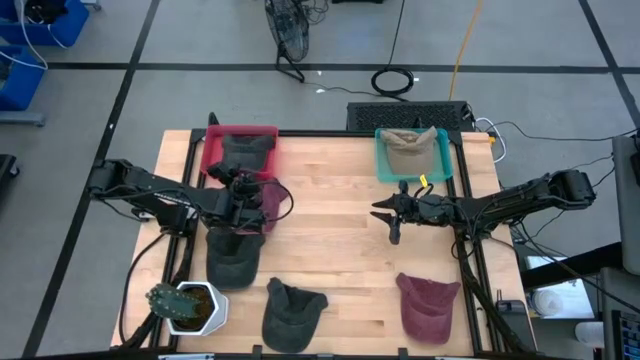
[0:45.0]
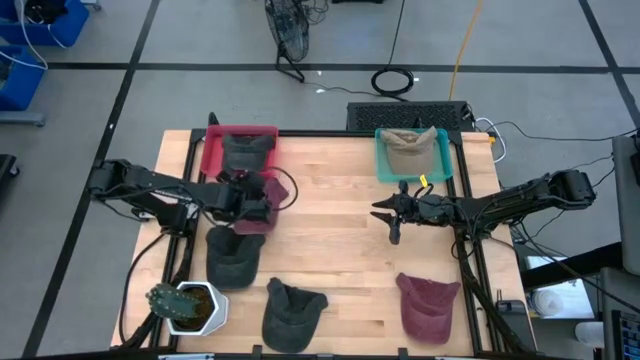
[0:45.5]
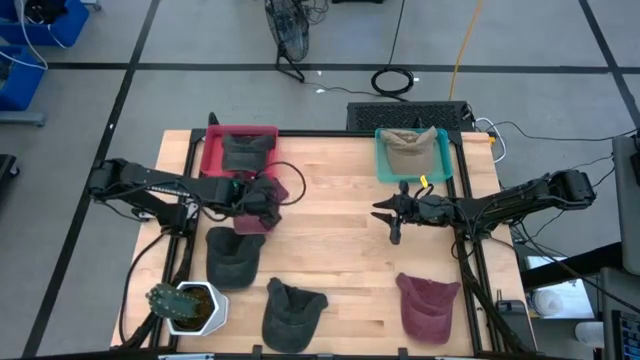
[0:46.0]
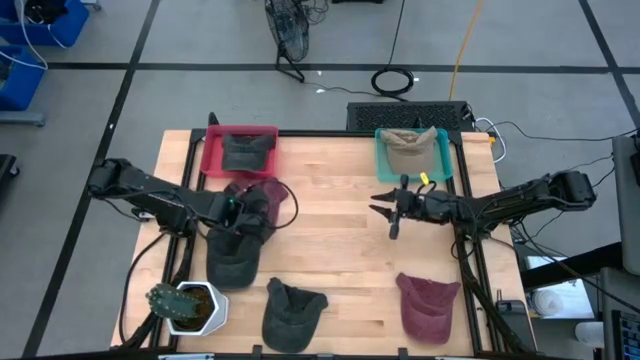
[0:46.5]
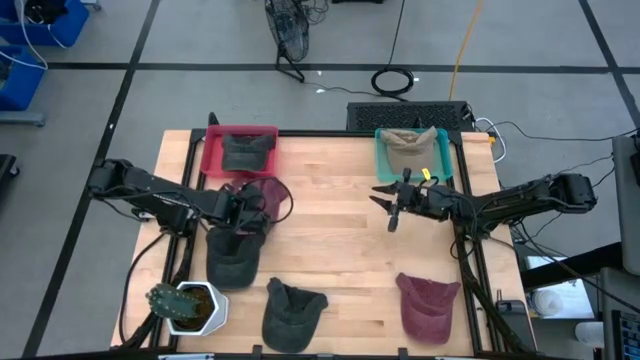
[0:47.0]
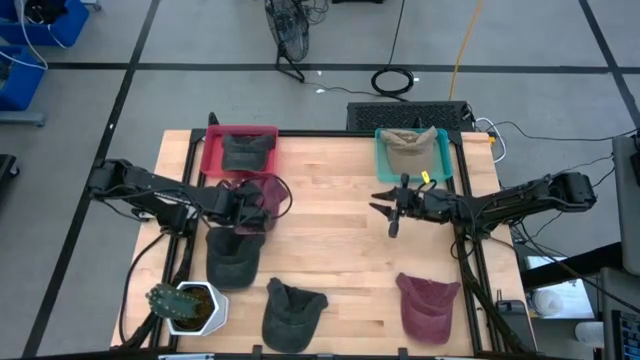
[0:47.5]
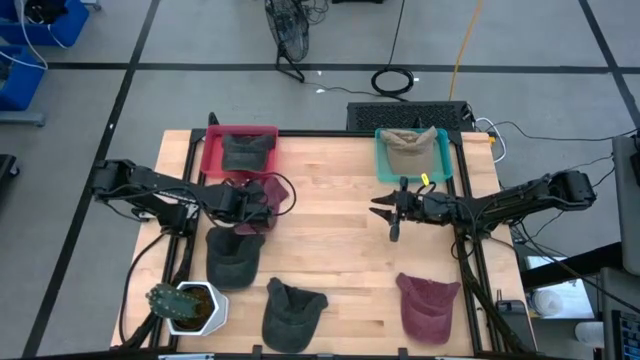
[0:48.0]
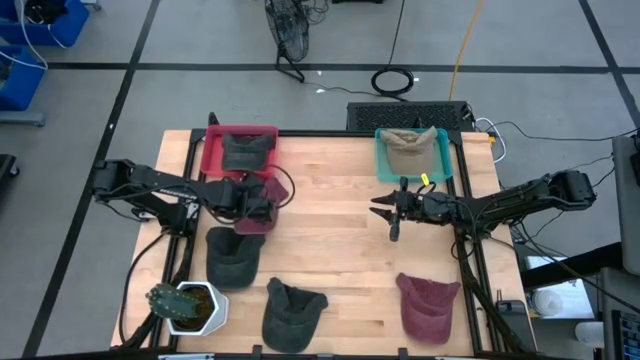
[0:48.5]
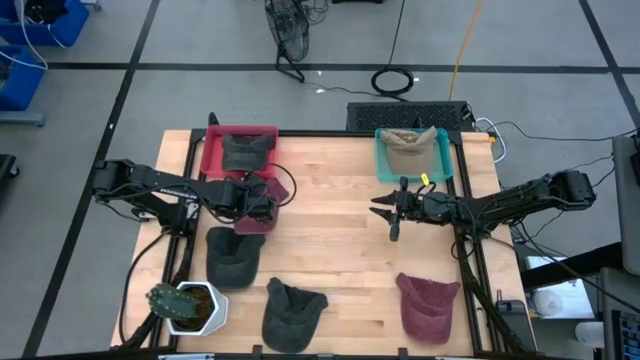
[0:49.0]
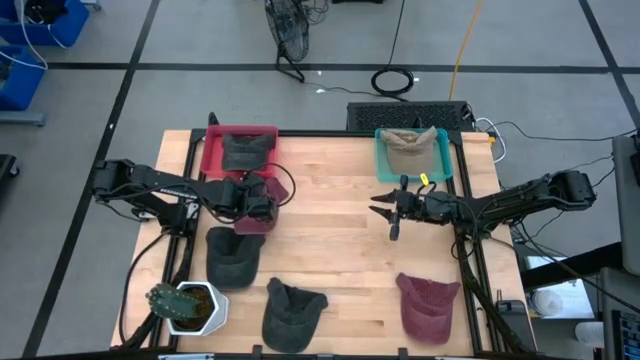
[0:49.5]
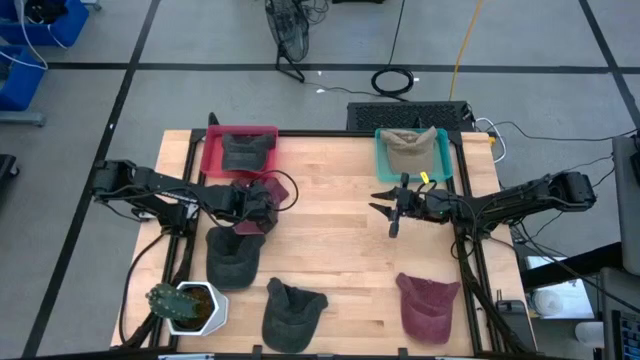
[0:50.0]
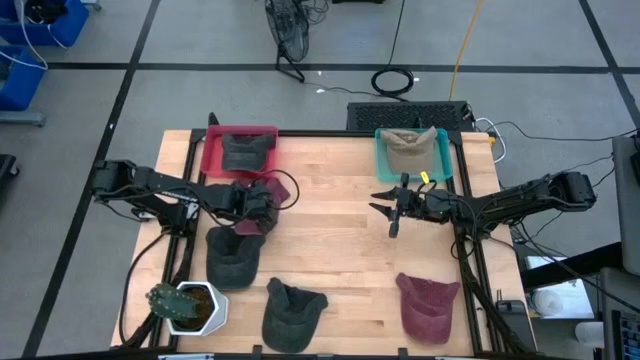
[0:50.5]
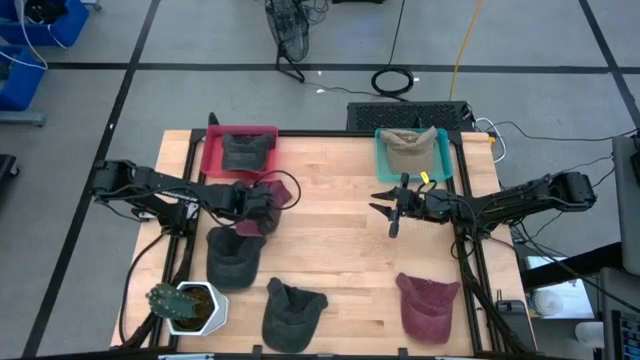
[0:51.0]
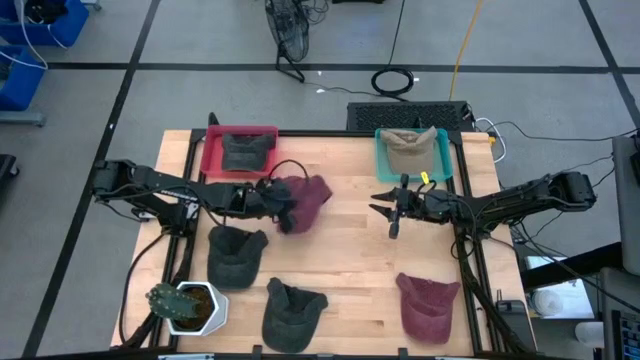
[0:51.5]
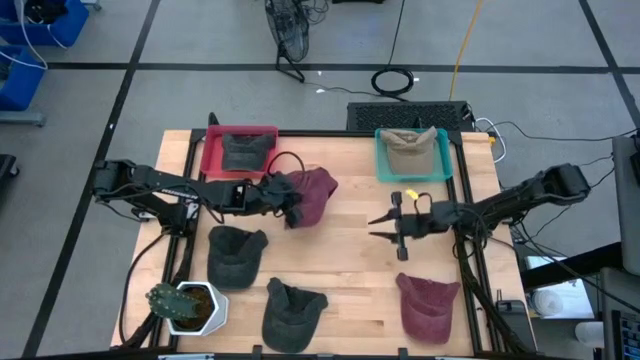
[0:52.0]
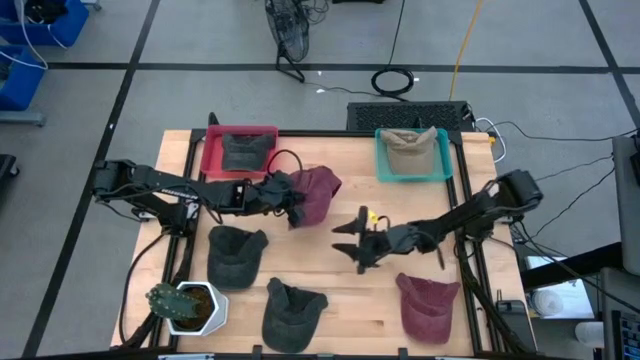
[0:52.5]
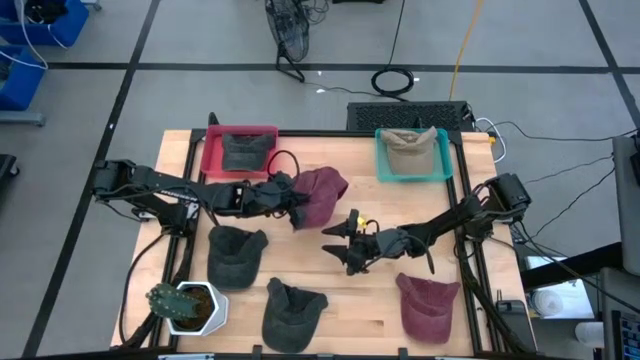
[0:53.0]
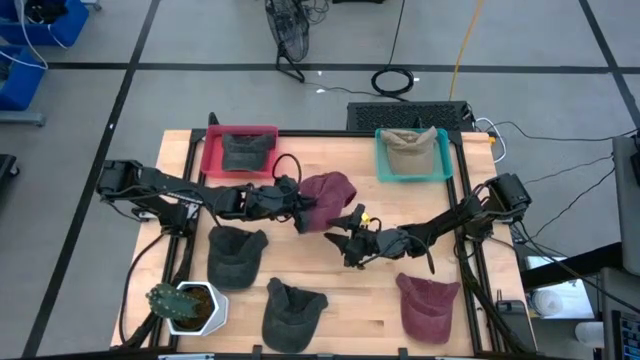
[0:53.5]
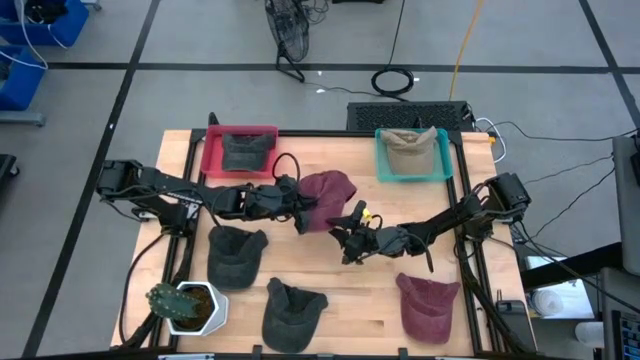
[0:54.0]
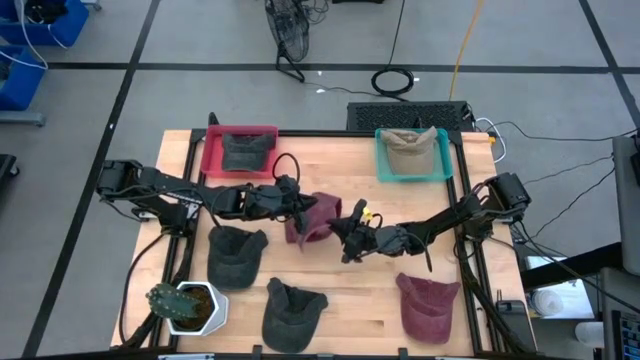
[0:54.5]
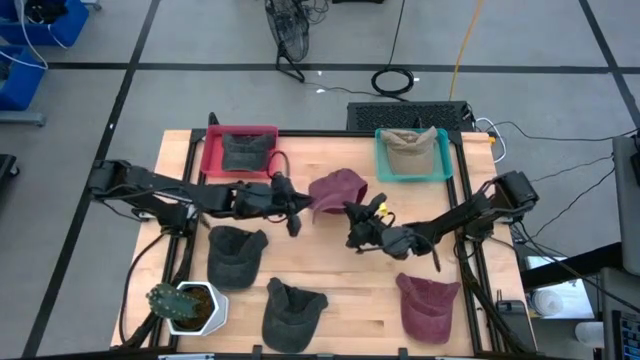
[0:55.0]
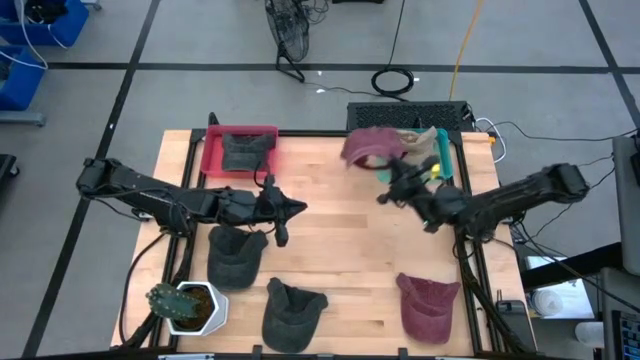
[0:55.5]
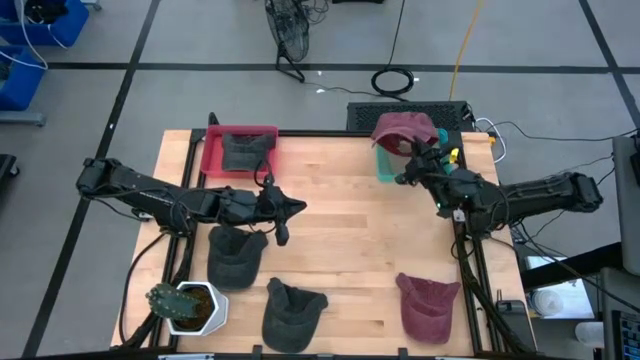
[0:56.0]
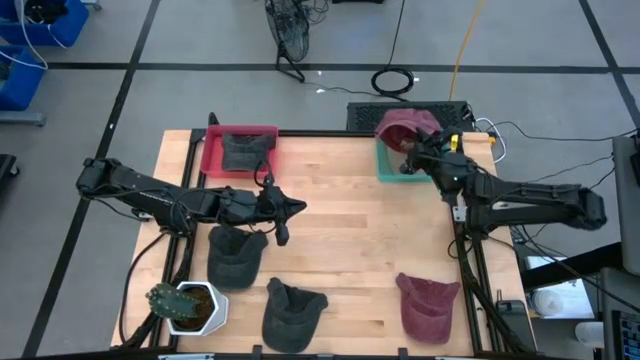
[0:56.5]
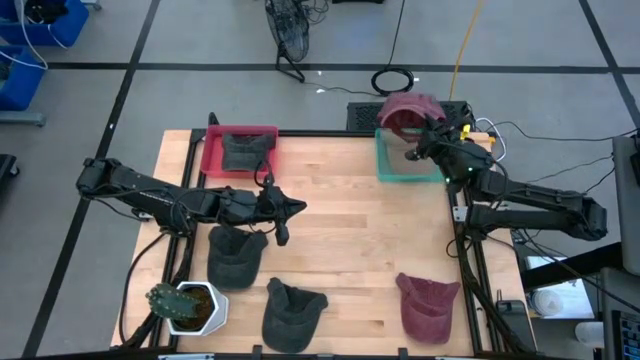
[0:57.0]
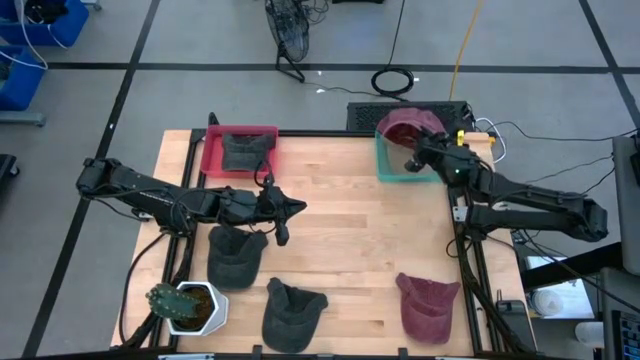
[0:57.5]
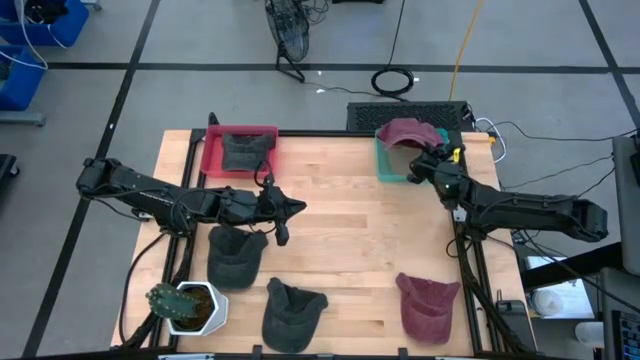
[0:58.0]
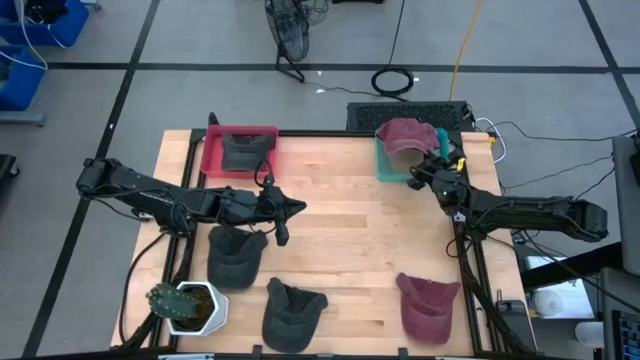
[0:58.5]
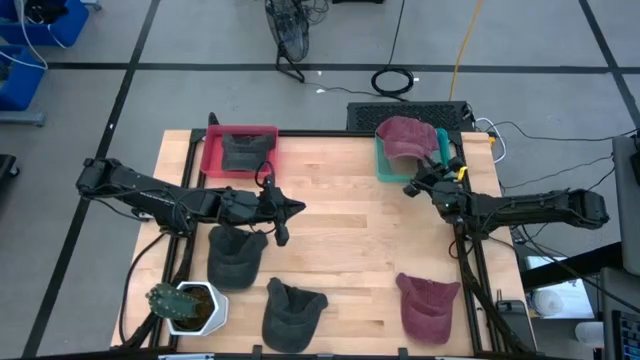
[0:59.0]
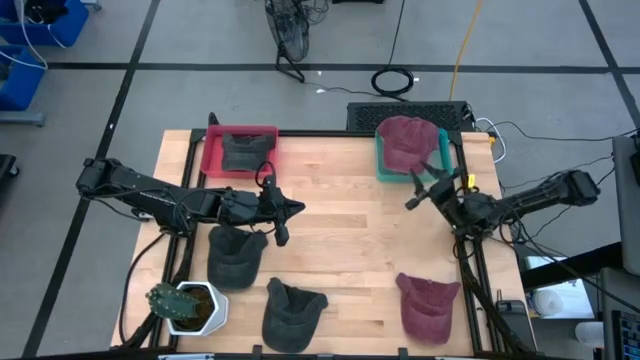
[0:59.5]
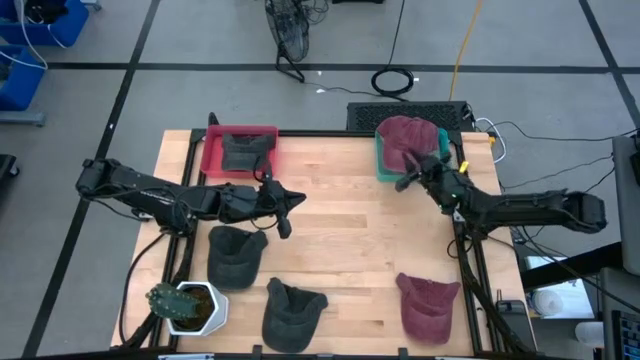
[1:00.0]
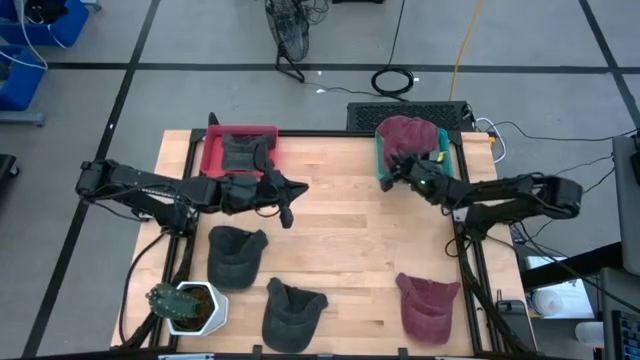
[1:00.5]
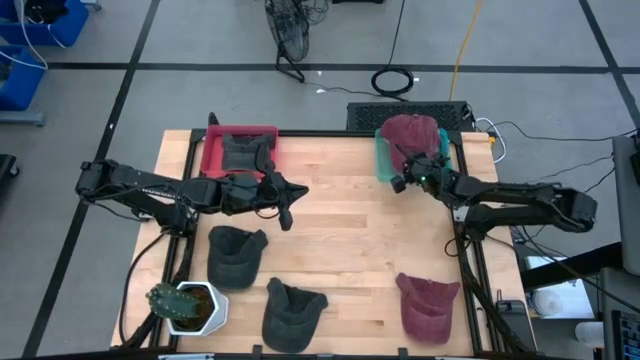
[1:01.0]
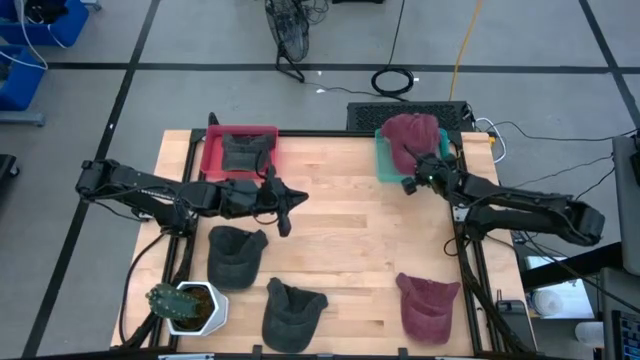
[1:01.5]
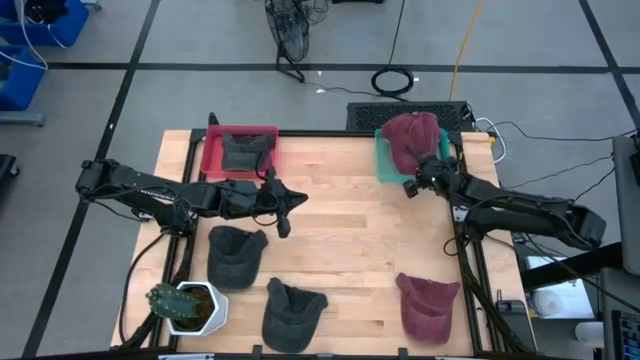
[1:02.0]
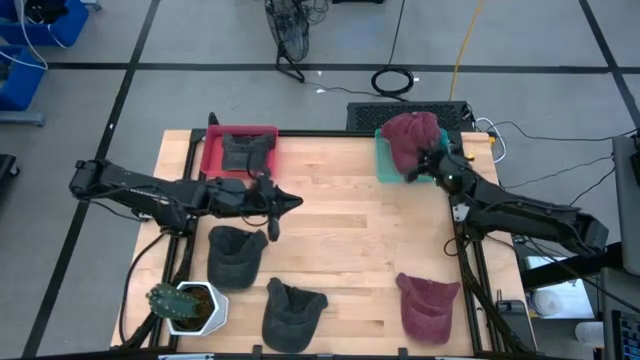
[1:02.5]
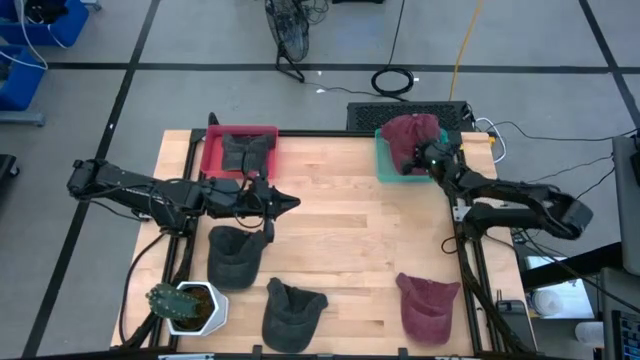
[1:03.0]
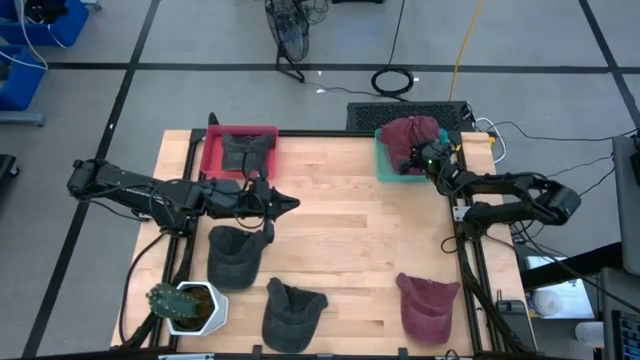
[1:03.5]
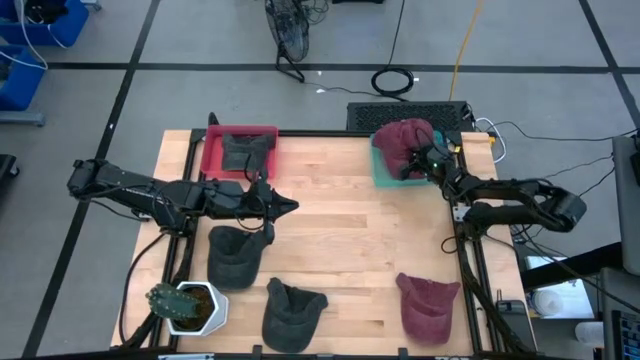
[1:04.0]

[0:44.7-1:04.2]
Task: Pick & Place hat
Put the top red cap into the green bin

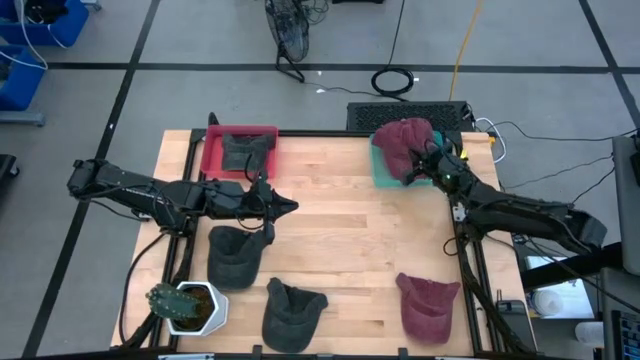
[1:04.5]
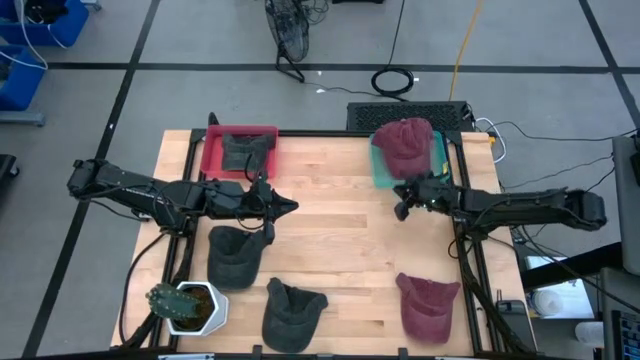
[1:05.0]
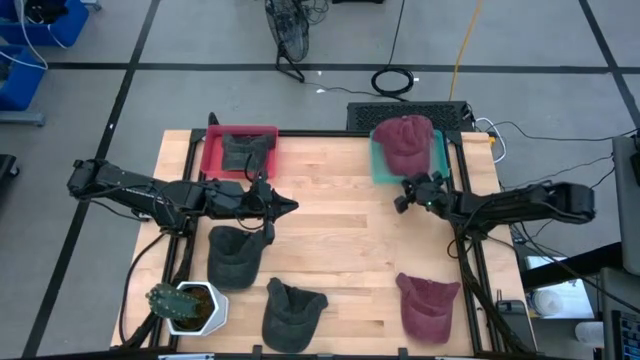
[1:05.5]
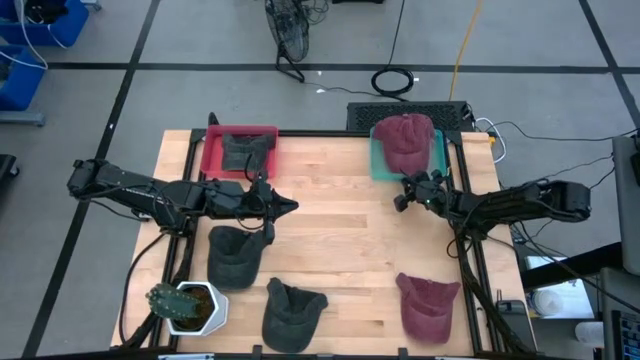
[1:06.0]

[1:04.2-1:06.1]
Adjust the green bin on the table
